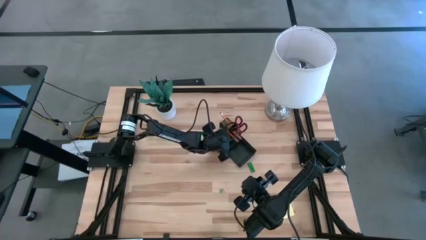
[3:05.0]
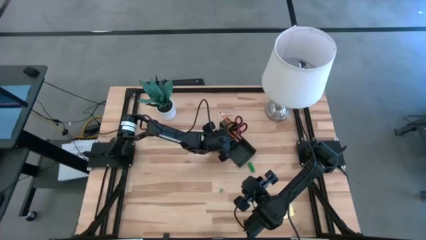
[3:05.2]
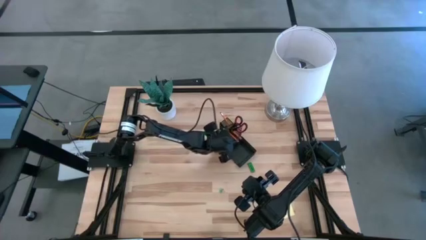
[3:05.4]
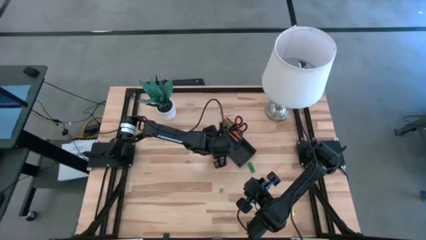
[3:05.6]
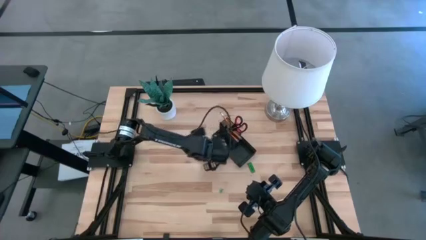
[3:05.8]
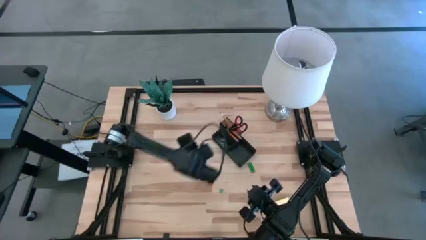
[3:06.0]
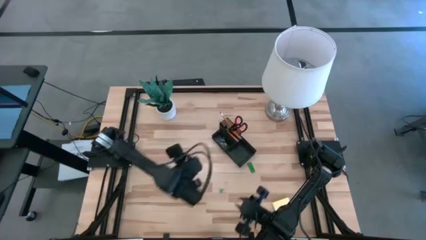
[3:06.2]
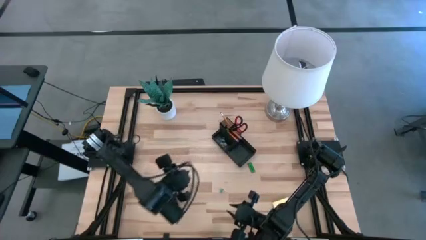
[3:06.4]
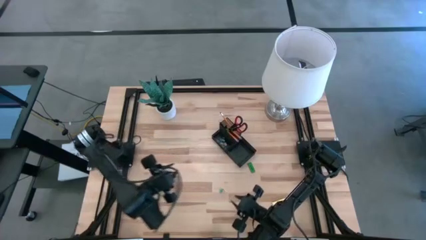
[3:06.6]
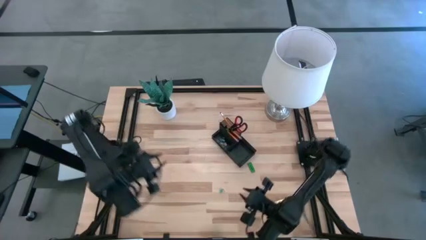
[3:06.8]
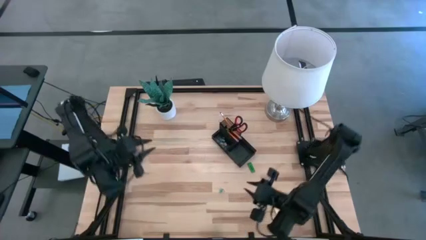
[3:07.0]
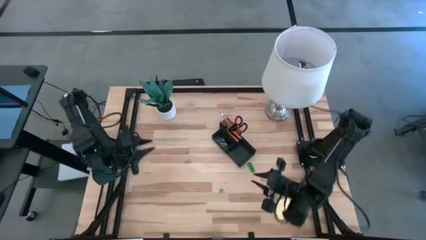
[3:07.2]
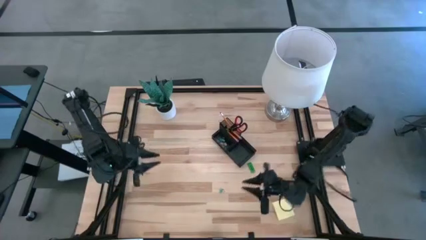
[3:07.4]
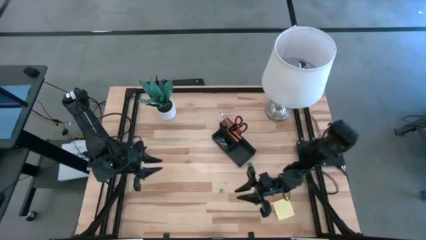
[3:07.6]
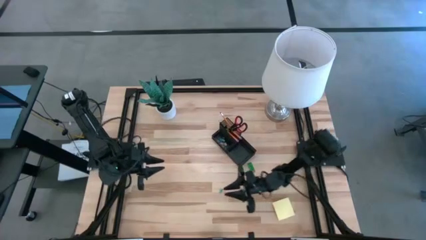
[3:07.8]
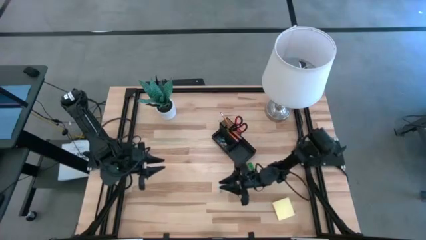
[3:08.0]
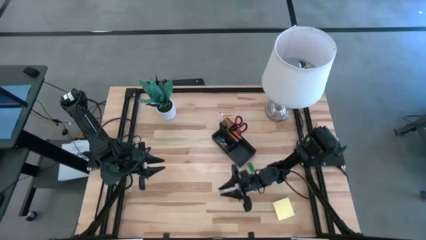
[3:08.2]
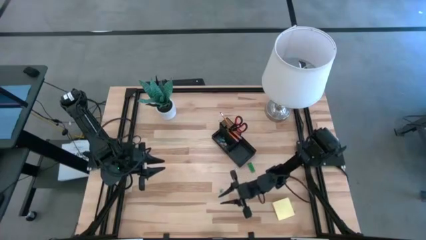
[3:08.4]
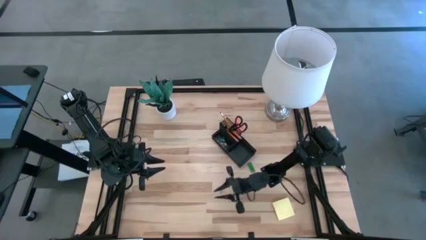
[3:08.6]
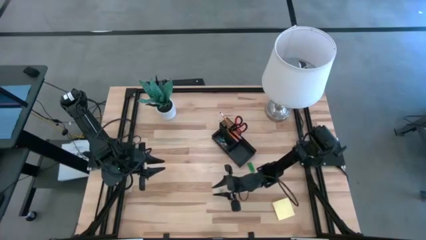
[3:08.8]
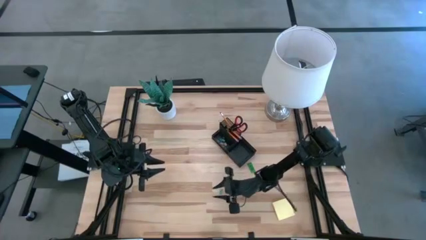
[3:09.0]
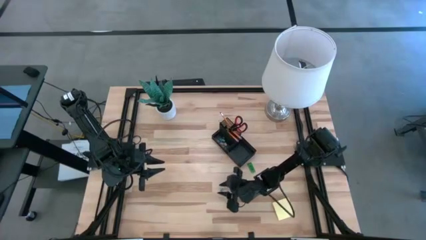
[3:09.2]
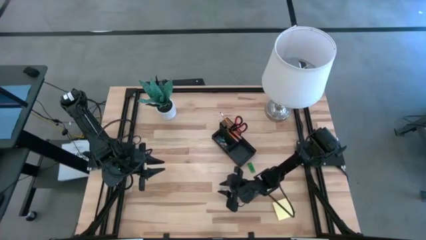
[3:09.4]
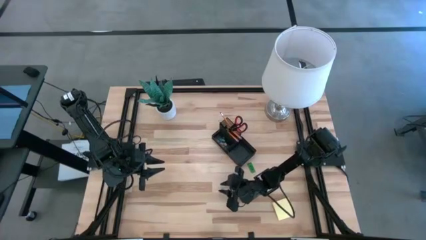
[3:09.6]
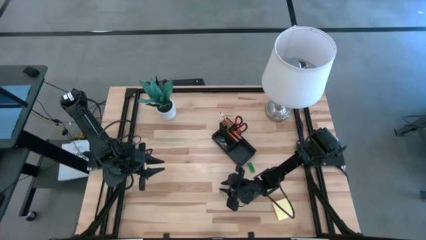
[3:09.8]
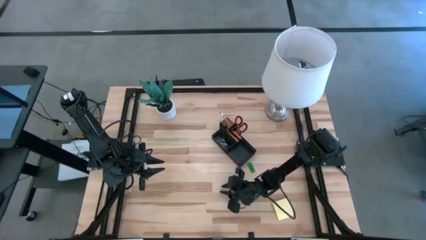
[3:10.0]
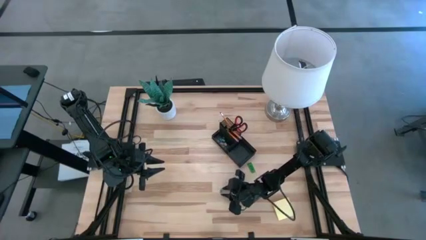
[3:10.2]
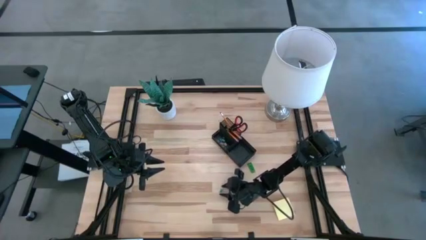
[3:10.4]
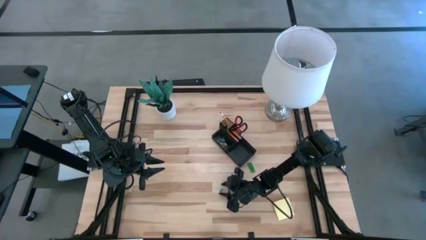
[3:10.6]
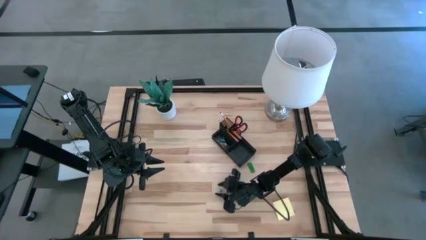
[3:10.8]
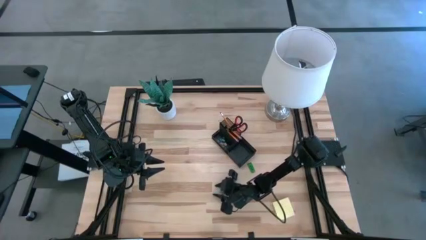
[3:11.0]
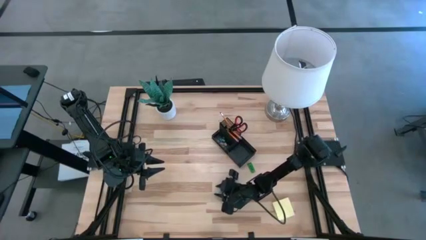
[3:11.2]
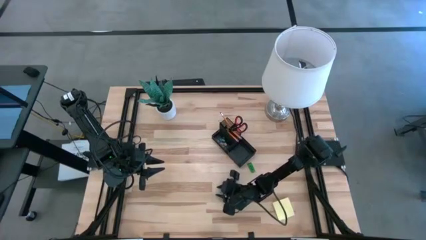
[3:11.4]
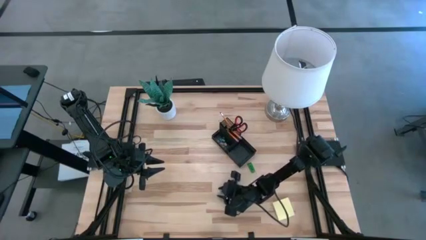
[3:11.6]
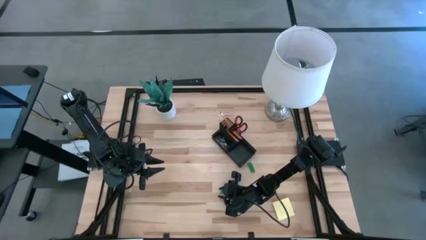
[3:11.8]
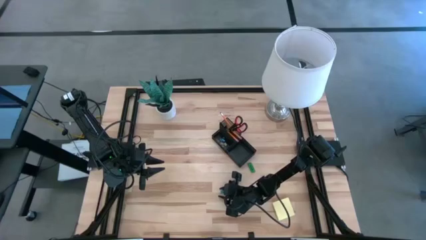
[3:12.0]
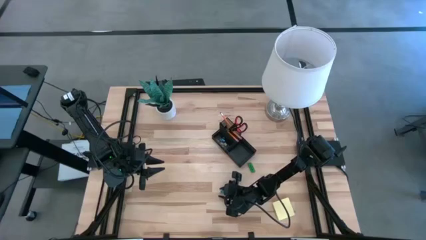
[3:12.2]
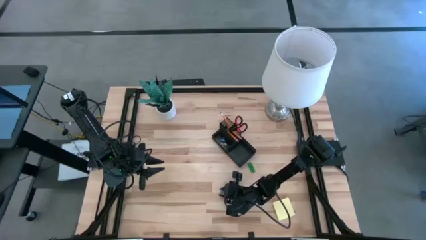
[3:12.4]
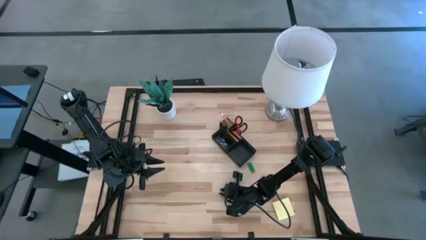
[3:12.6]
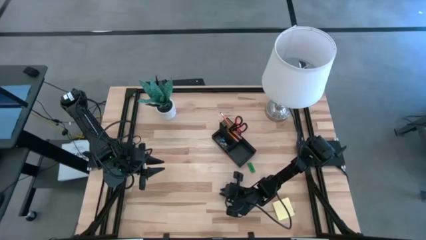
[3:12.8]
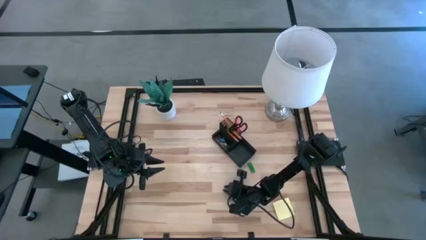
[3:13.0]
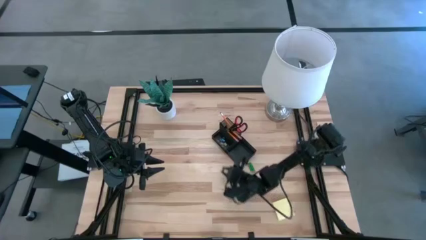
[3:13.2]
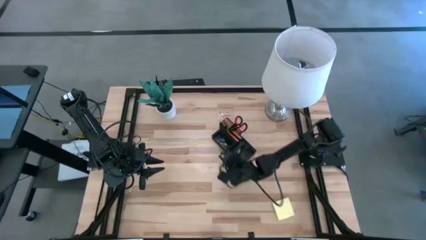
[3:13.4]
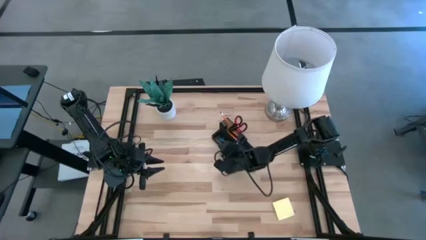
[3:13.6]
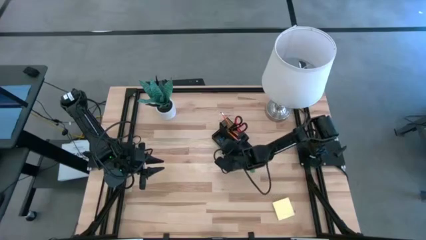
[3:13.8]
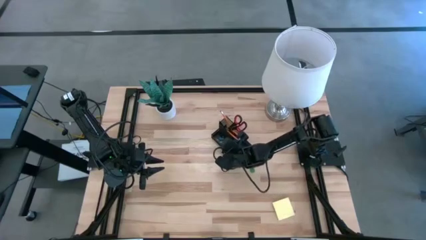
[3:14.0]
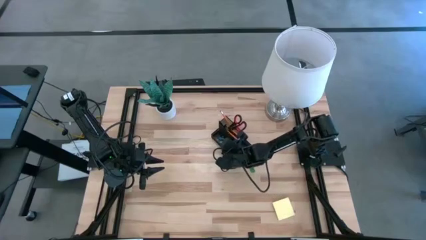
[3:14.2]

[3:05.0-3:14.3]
Task: Pick and place office supplies into organizer
Put the blue binder clip into the black desk organizer

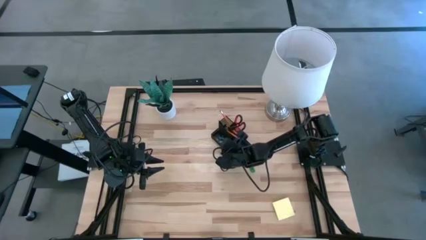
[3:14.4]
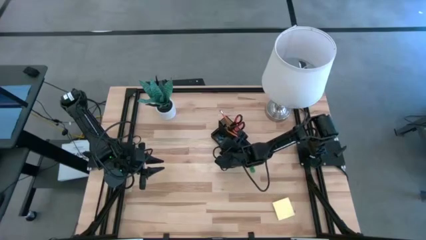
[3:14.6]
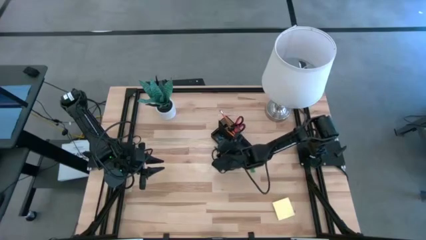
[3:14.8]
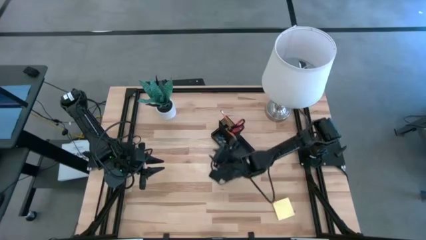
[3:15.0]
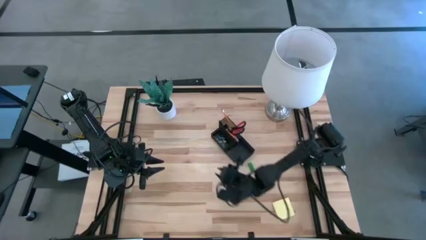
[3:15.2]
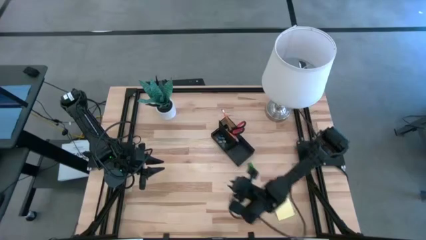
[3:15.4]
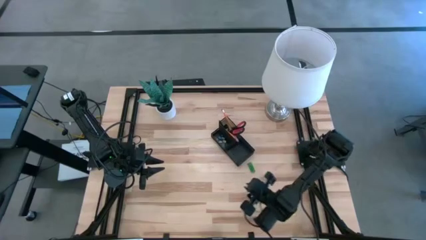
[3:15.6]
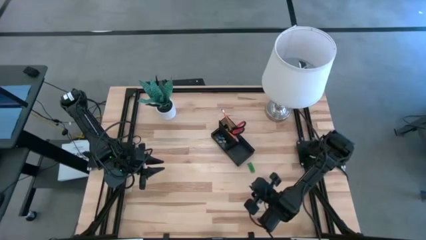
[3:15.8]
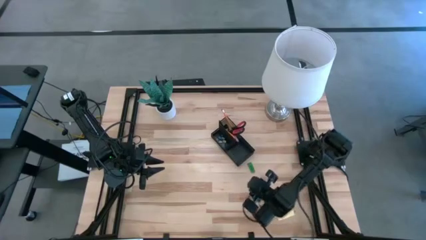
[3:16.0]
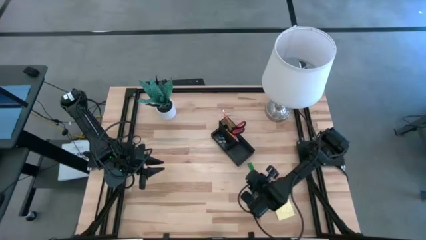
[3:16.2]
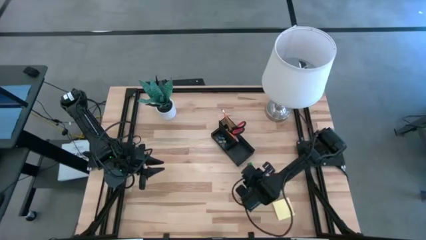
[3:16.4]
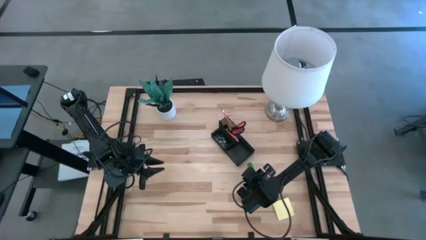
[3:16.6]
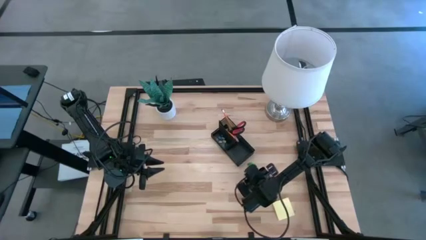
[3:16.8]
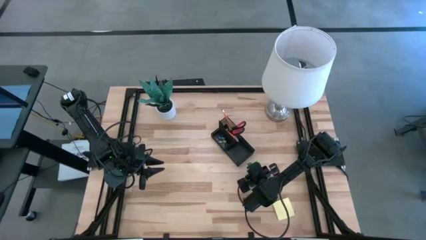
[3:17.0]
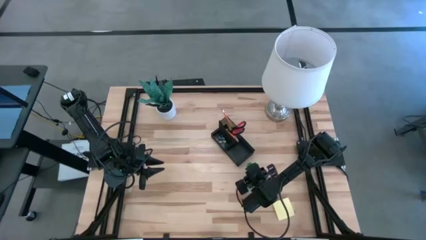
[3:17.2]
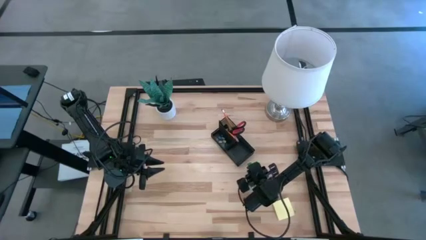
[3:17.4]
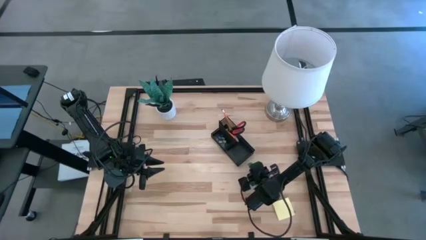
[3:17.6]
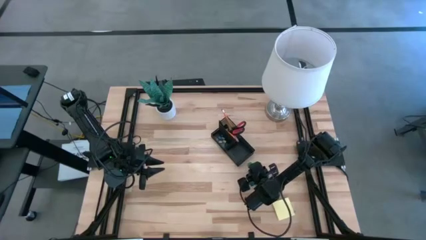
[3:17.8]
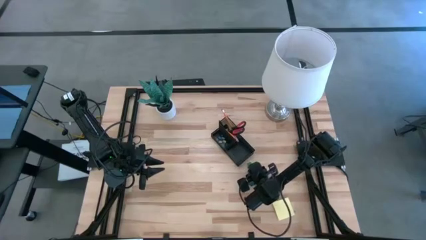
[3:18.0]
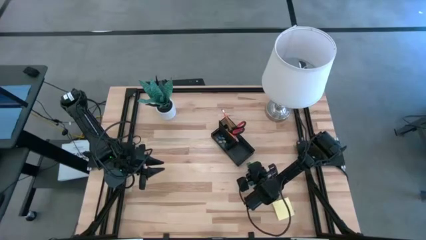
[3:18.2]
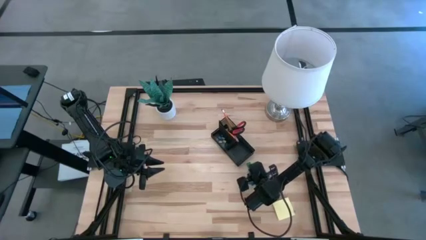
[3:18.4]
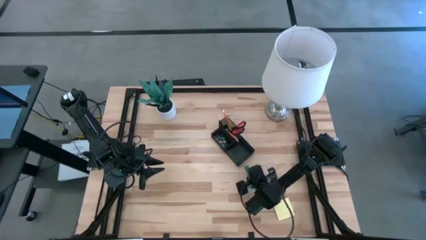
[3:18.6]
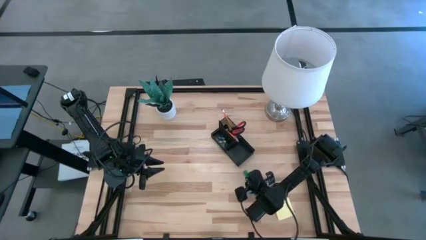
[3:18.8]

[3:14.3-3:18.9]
Put the green eraser into the black desk organizer

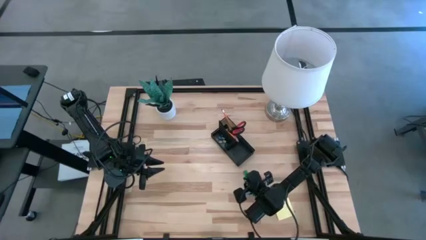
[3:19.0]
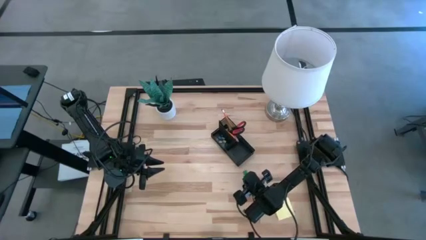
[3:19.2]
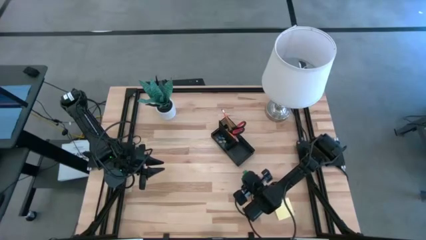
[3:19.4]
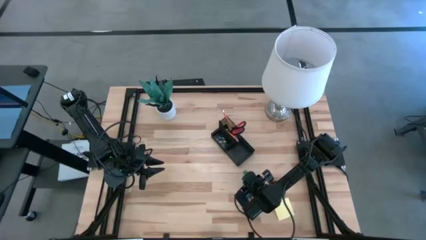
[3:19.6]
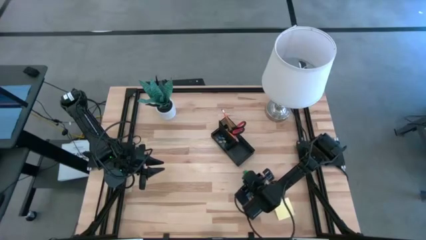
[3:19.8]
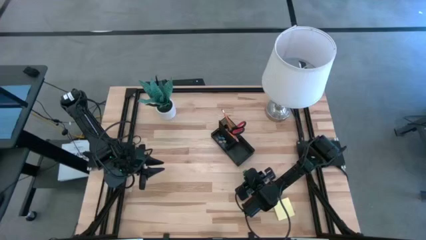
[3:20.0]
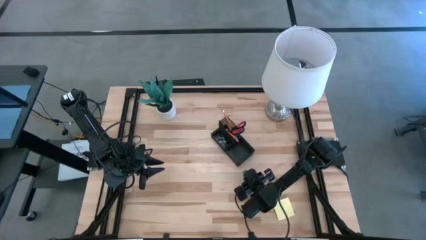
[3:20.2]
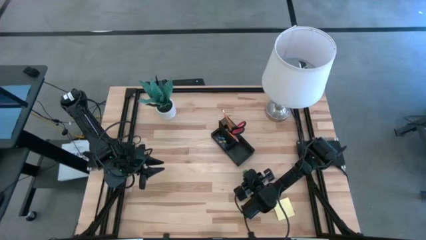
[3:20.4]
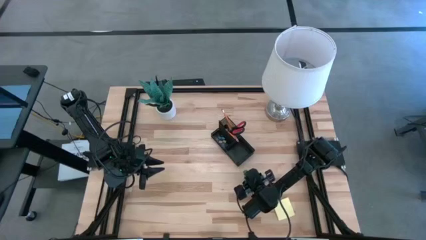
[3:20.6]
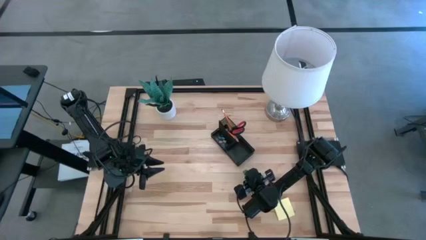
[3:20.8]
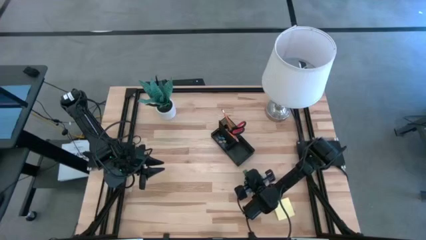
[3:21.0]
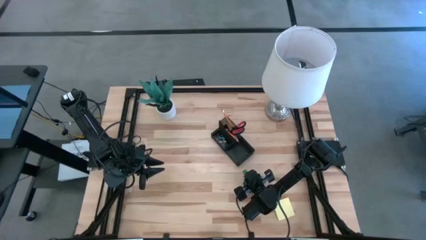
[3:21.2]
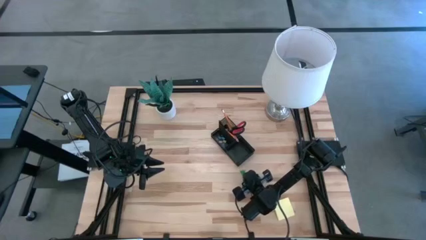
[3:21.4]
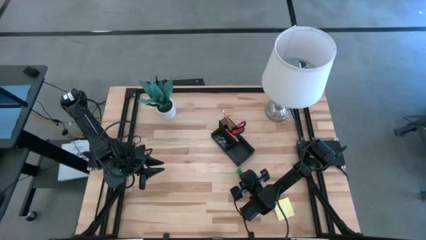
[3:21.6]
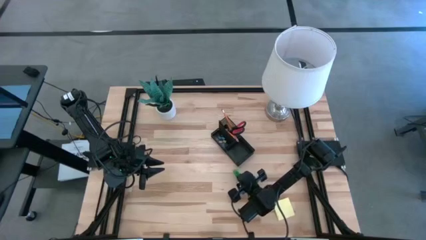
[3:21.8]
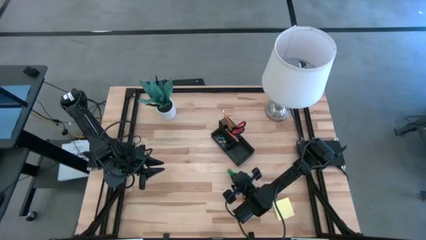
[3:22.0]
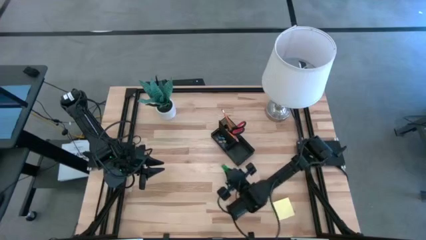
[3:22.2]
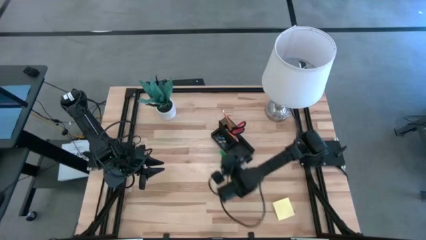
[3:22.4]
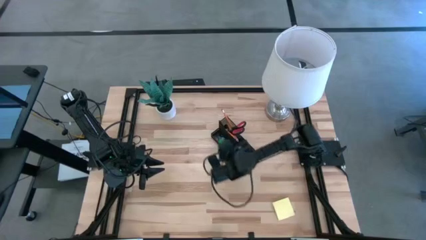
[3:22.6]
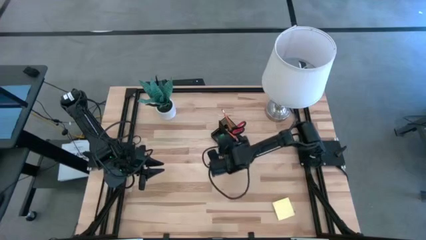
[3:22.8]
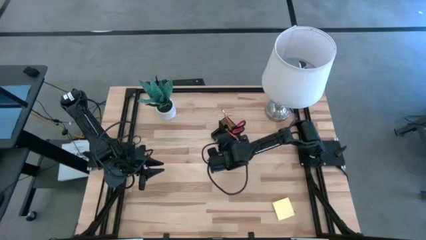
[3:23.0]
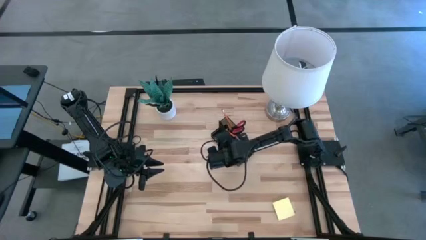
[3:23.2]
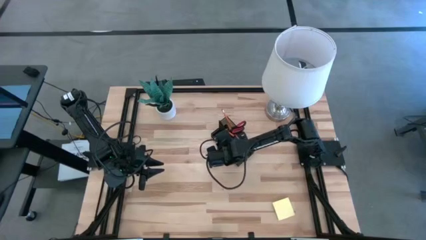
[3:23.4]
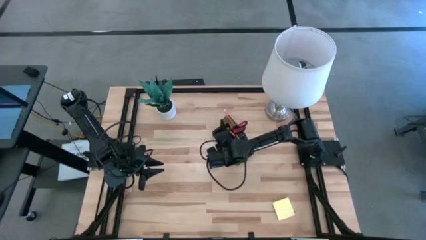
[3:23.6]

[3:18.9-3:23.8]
Put the green eraser into the black desk organizer
